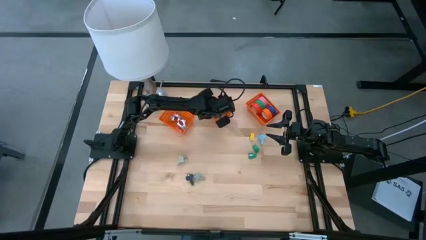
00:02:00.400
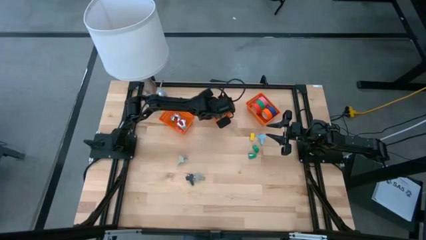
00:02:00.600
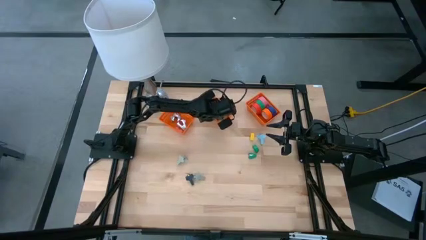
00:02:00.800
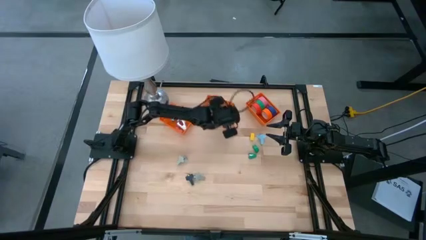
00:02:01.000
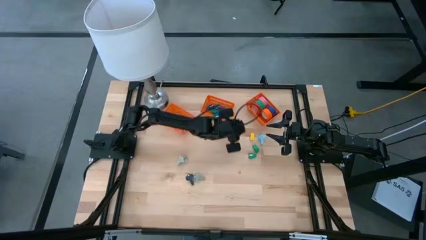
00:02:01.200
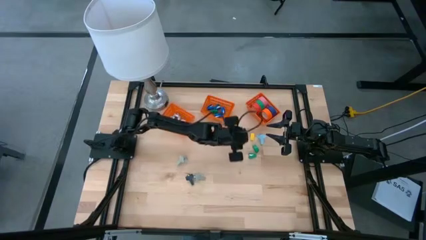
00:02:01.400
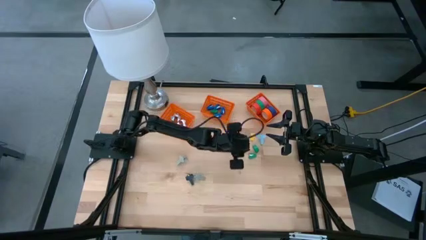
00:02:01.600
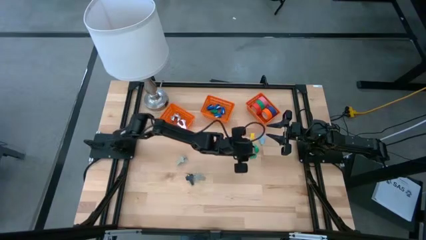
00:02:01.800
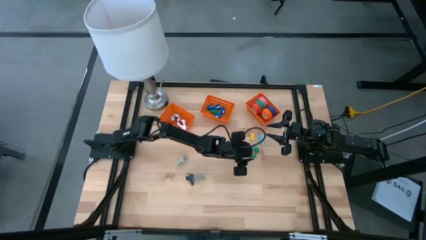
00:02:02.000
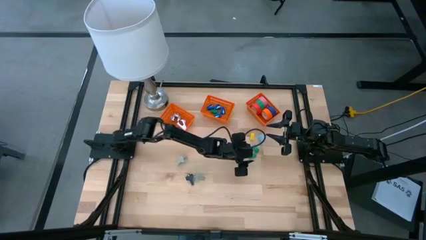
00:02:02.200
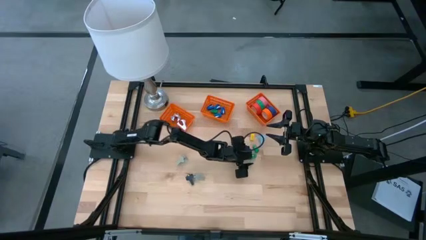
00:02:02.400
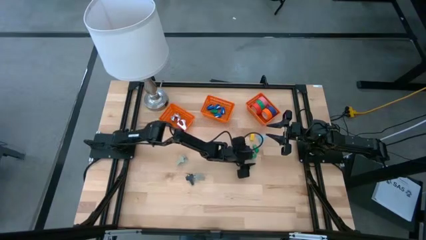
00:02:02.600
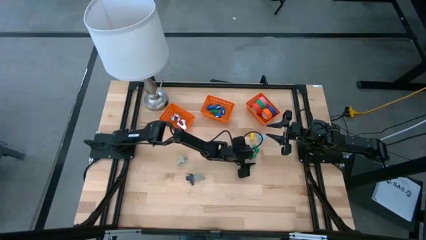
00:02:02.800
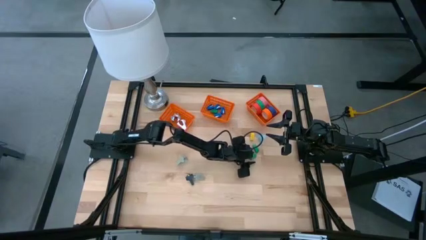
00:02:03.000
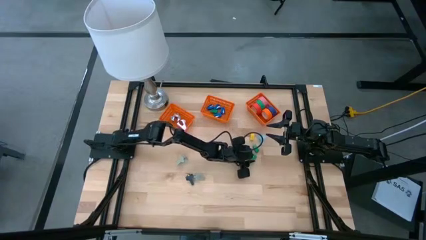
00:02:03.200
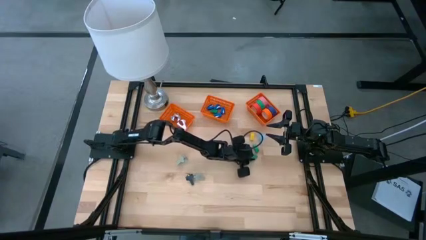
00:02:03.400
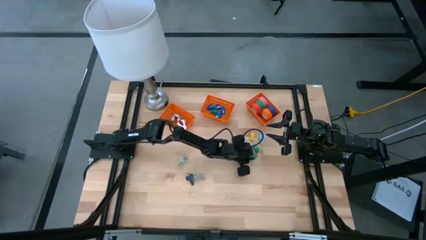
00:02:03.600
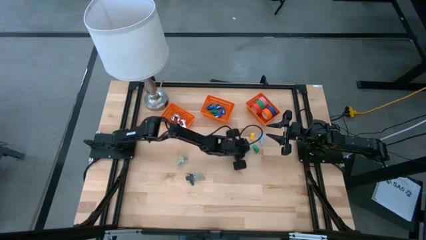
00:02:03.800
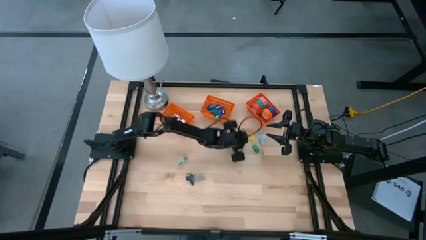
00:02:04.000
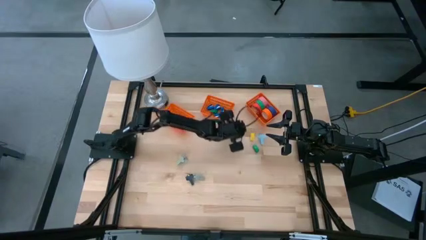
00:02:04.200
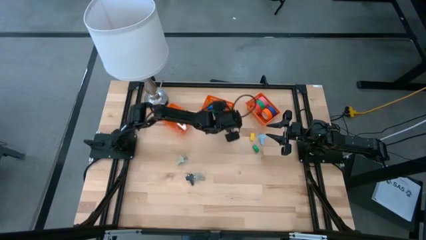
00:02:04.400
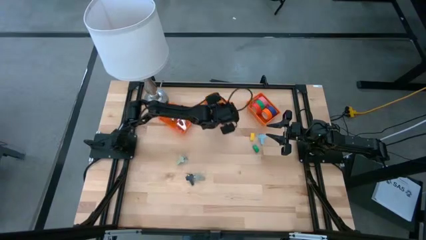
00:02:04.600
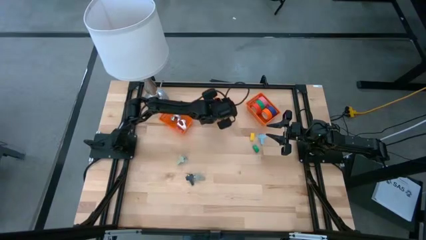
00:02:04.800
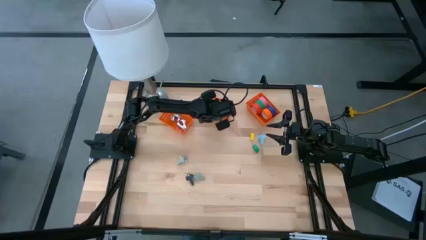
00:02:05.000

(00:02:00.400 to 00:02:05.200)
Task: Pick and place Stapler, Stapler remover, tape
Put the green stapler into the middle orange bin

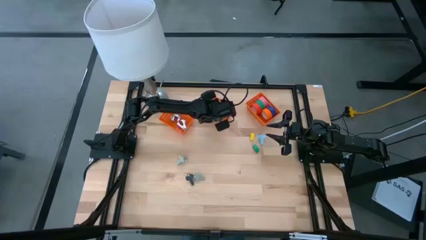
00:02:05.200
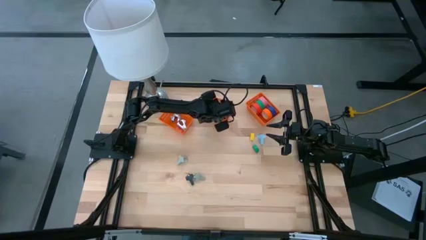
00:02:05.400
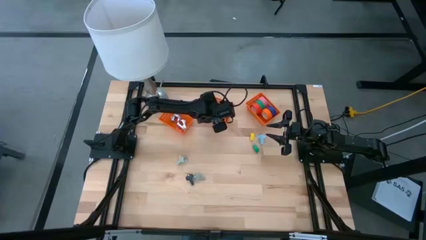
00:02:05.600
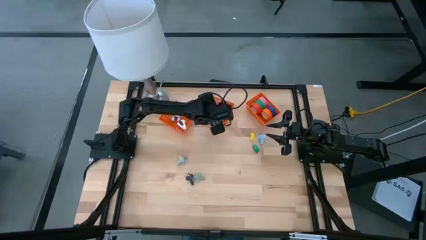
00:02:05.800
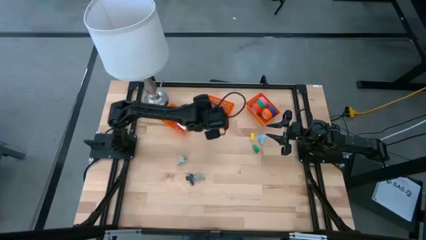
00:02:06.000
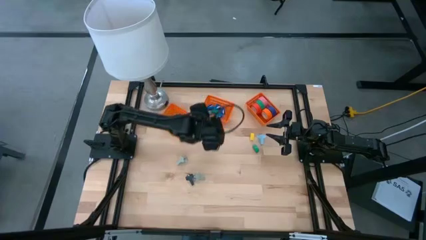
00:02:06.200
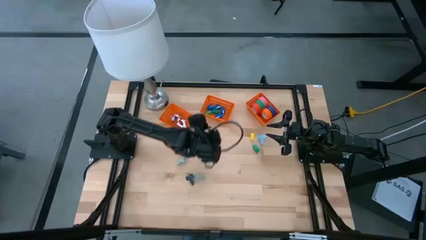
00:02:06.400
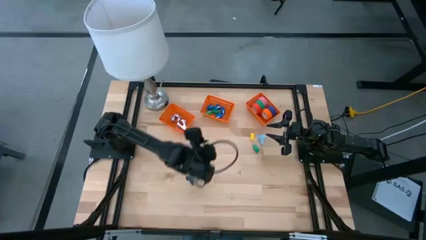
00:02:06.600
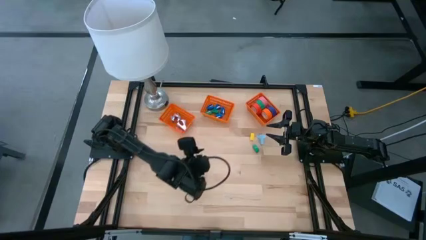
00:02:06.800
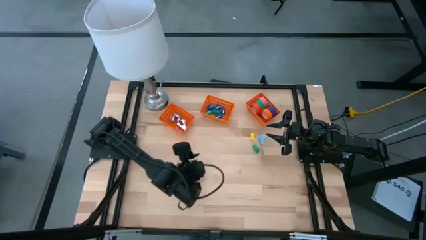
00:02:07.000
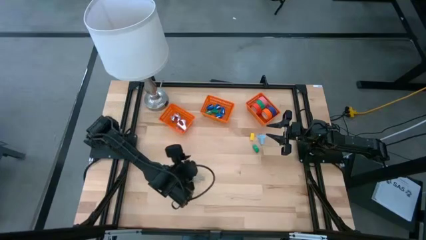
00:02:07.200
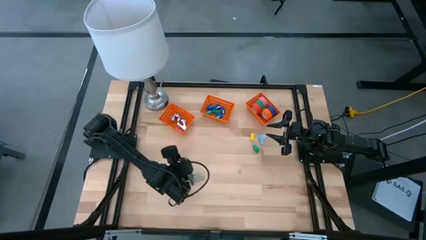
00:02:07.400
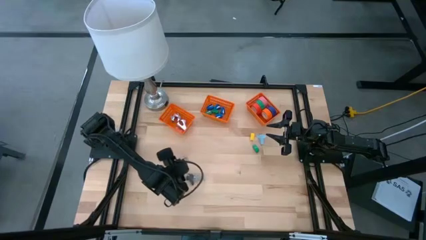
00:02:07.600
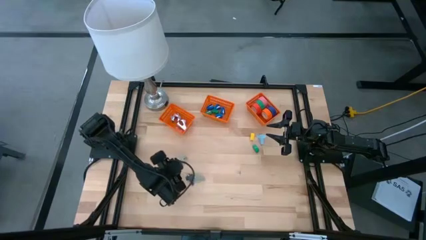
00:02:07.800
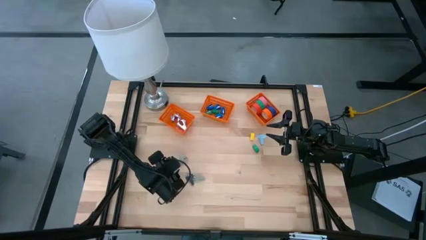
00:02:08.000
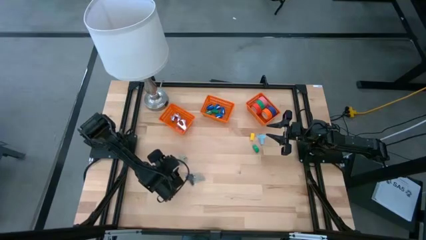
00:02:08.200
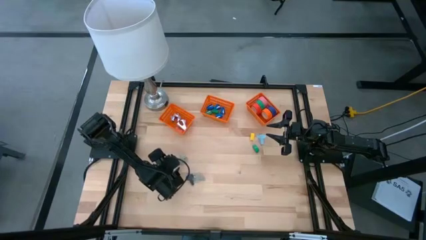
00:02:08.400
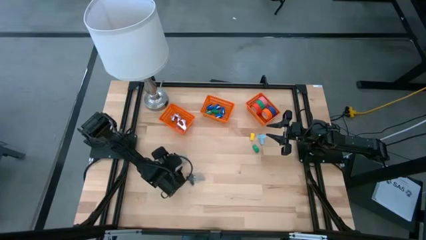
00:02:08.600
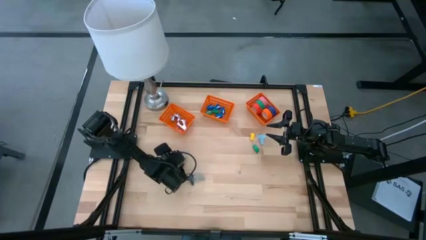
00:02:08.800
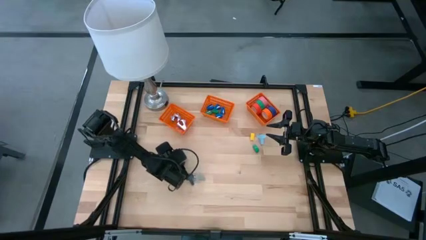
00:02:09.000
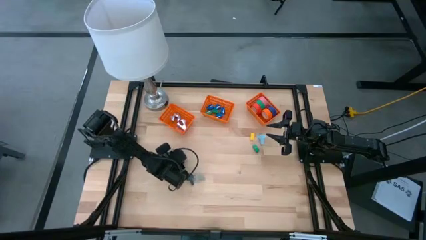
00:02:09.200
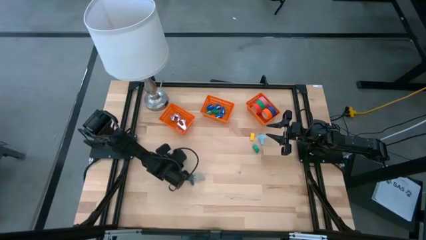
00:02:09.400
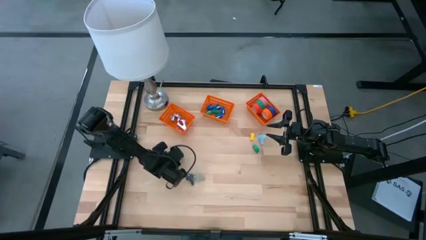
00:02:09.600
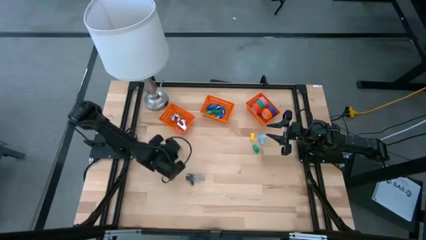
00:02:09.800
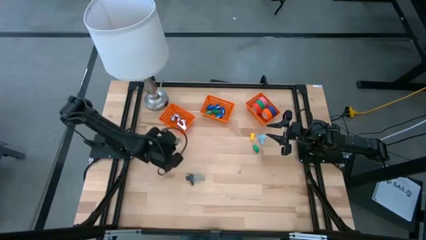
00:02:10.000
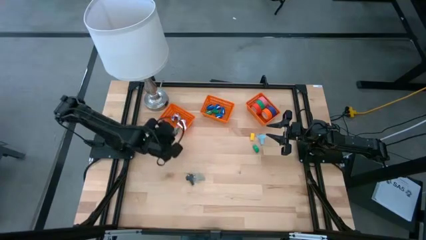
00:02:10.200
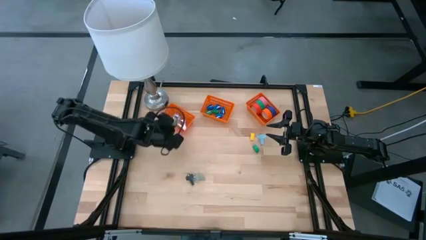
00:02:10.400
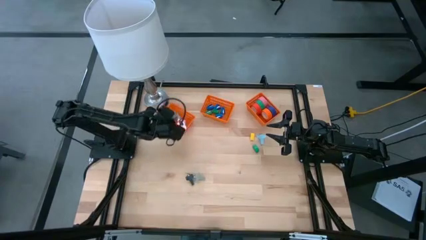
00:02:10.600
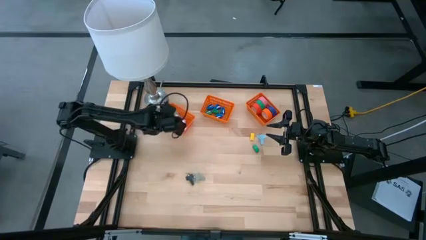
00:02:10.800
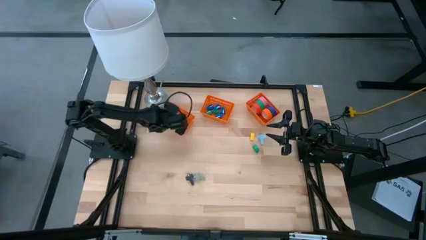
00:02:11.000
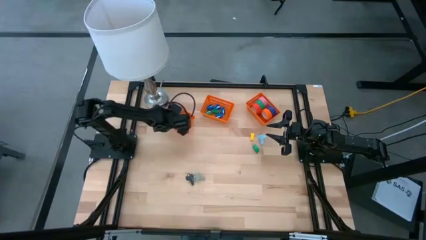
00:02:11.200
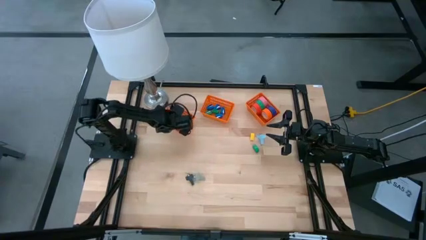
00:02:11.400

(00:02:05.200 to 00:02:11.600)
Put the gray staple remover into the left orange bin

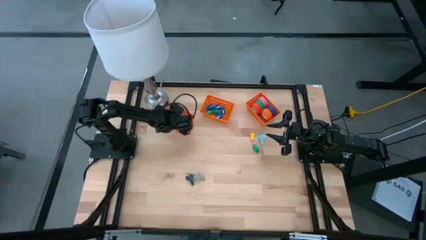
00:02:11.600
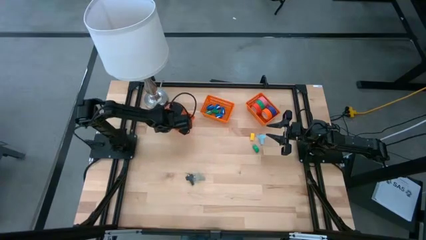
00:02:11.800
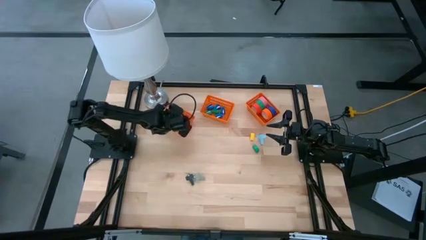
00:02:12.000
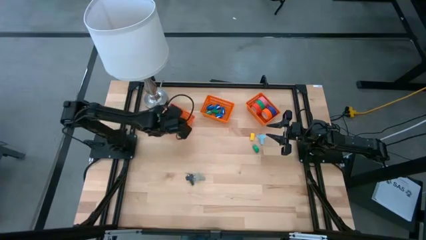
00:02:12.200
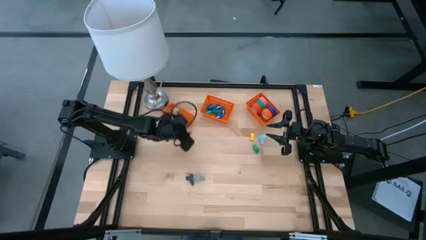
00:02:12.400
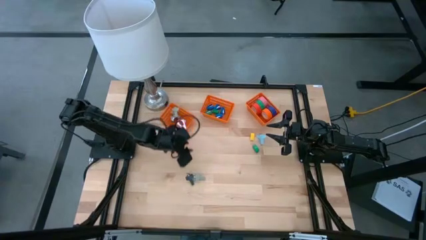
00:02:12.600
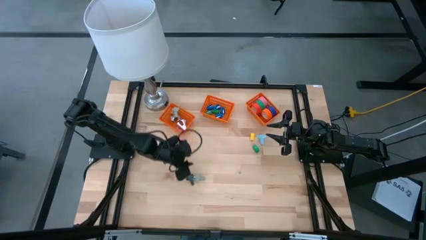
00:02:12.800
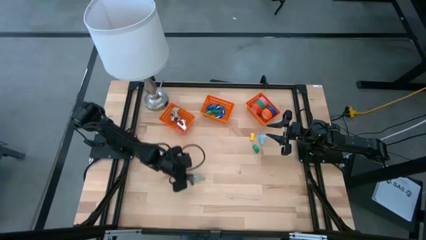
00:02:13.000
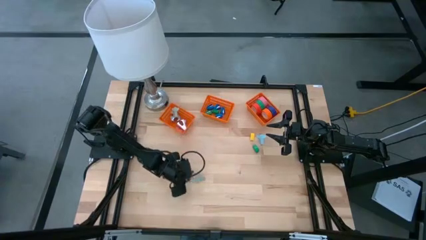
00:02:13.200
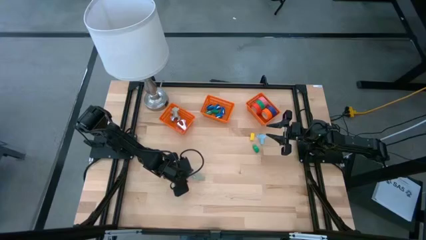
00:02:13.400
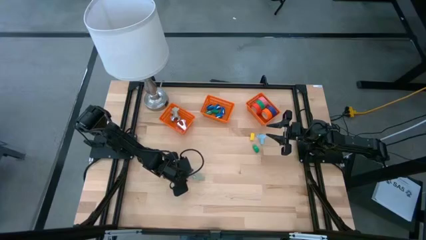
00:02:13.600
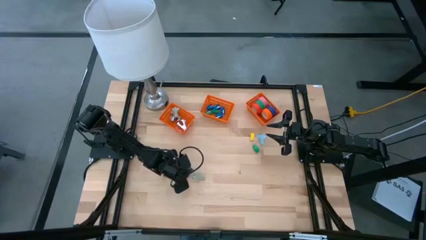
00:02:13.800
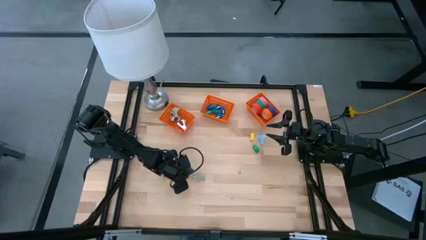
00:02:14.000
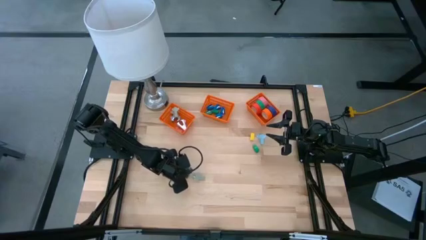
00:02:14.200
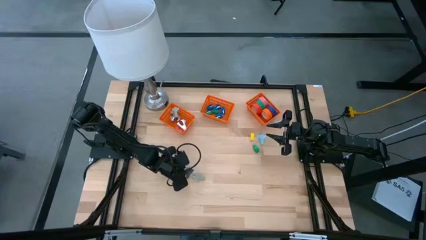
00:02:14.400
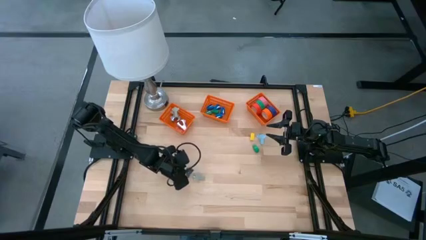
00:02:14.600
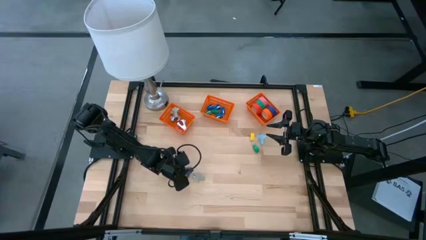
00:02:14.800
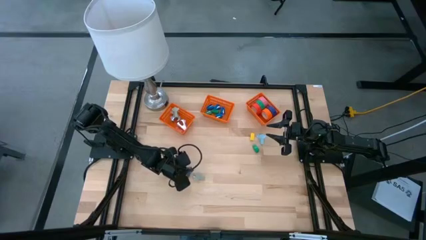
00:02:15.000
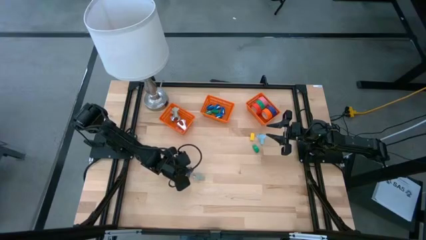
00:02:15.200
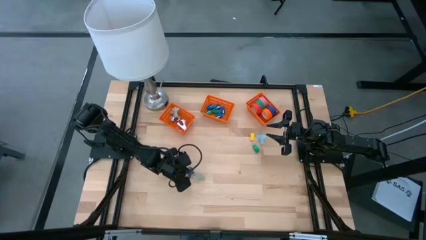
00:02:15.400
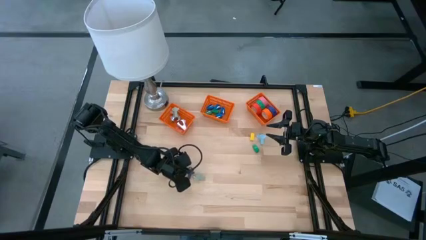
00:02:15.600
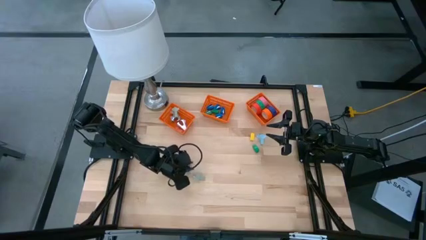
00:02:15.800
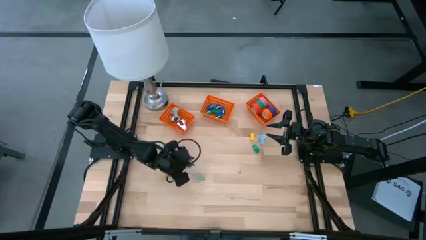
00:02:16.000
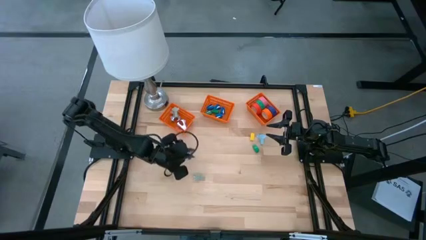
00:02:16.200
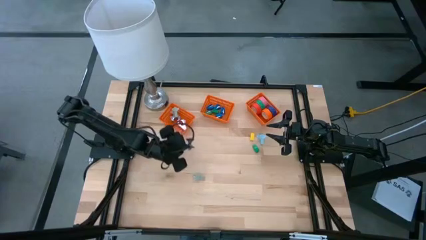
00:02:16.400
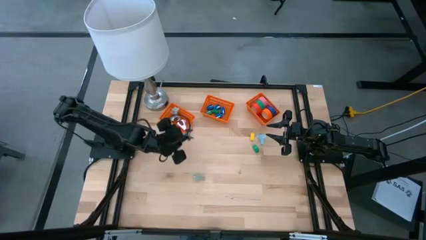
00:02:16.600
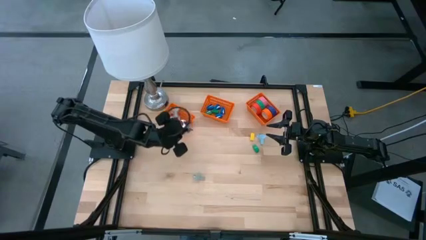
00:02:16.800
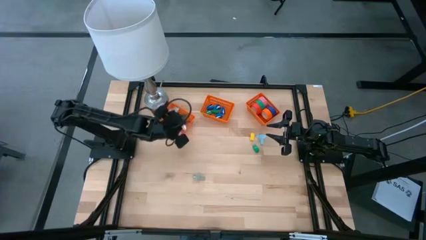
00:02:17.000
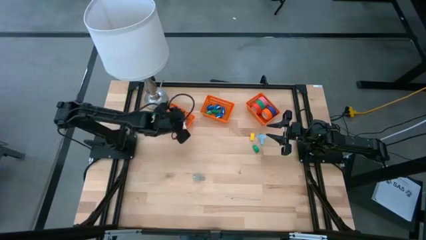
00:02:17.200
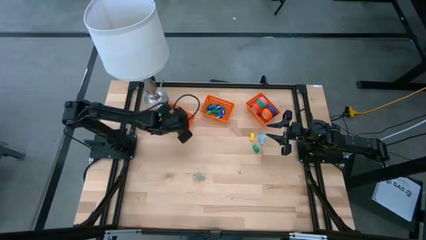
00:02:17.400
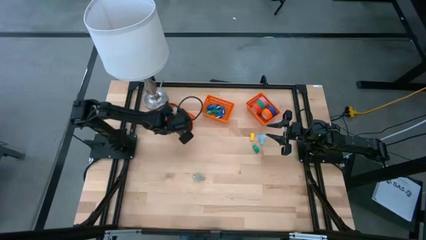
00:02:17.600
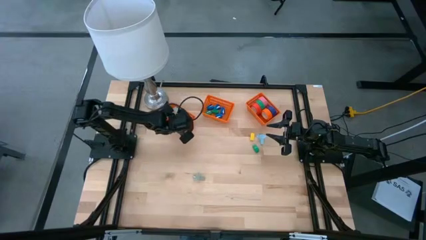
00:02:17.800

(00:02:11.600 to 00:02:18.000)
Put the dark blue staple remover into the left orange bin
